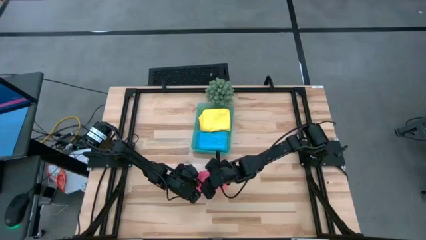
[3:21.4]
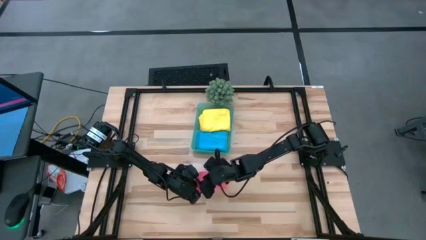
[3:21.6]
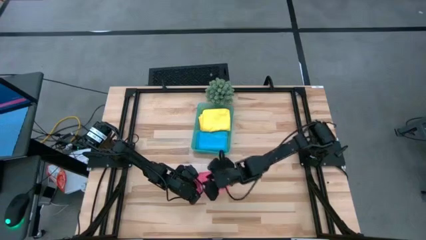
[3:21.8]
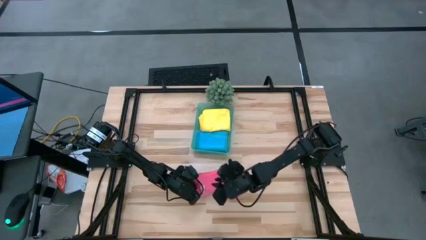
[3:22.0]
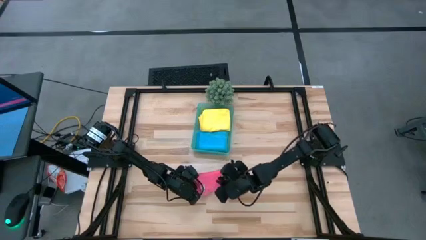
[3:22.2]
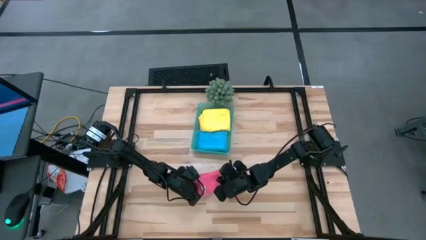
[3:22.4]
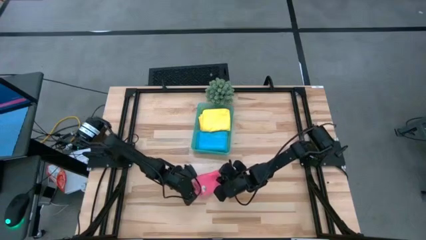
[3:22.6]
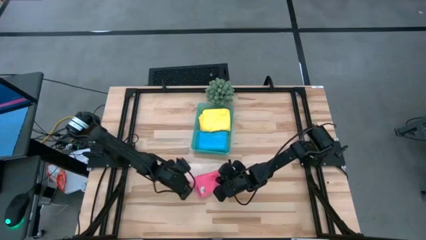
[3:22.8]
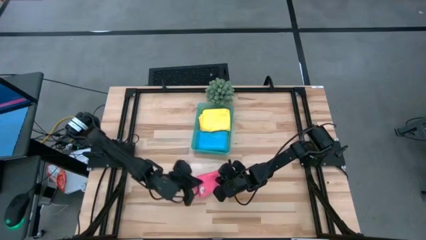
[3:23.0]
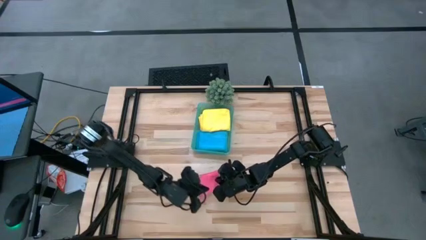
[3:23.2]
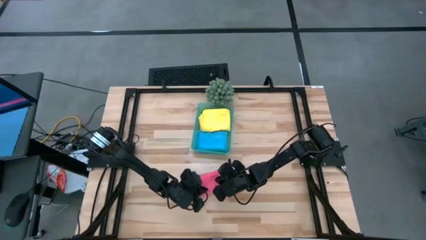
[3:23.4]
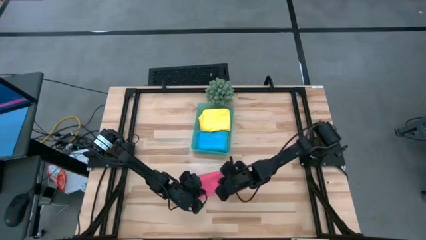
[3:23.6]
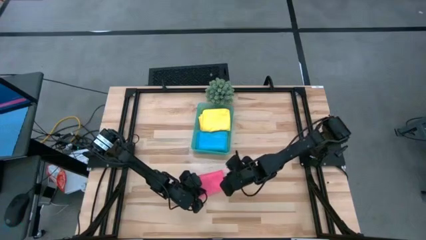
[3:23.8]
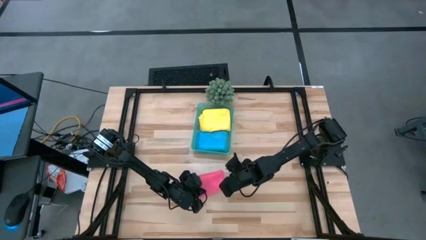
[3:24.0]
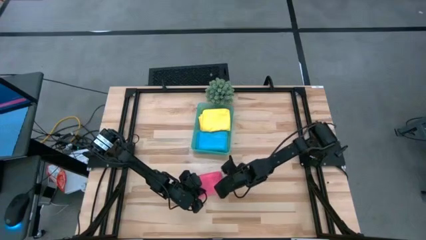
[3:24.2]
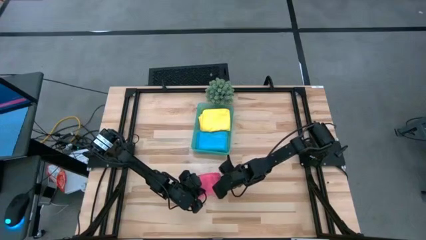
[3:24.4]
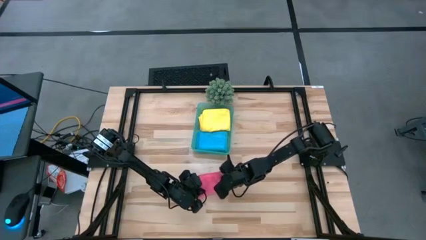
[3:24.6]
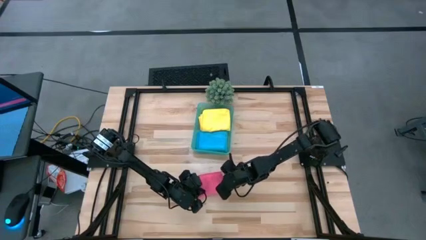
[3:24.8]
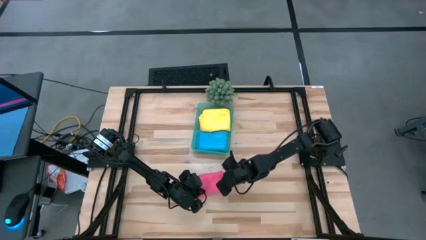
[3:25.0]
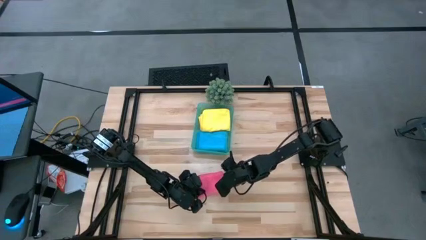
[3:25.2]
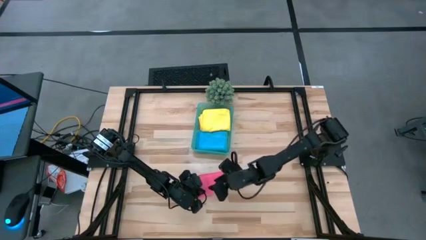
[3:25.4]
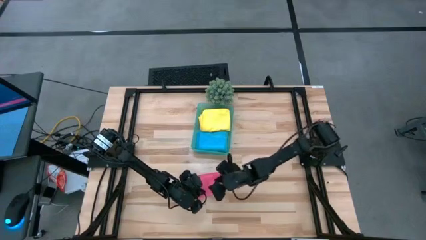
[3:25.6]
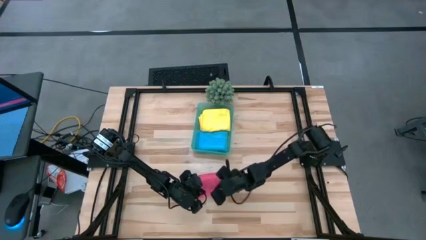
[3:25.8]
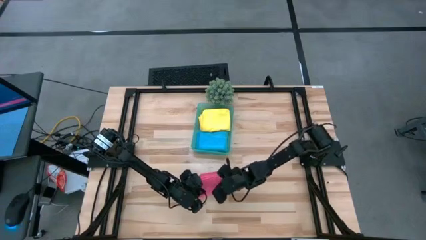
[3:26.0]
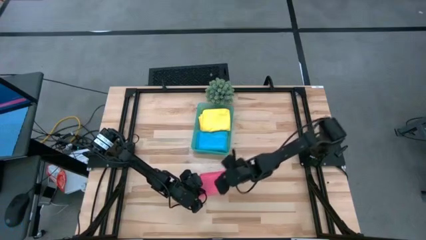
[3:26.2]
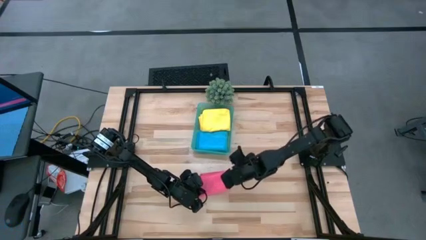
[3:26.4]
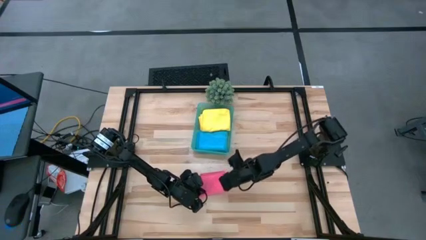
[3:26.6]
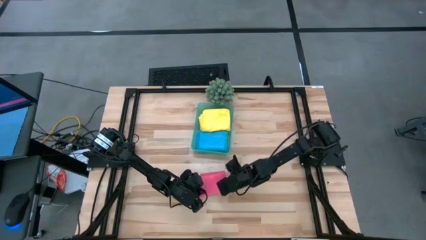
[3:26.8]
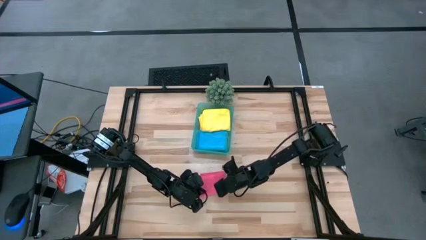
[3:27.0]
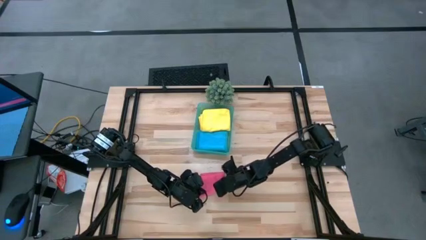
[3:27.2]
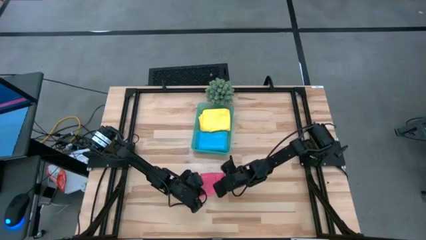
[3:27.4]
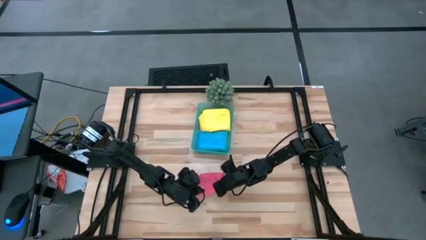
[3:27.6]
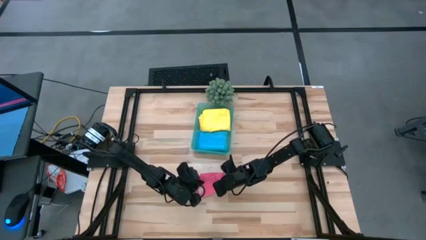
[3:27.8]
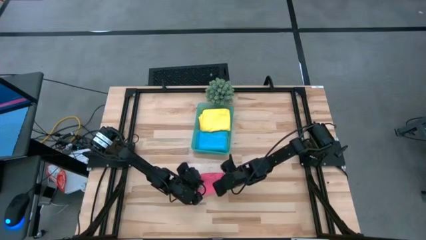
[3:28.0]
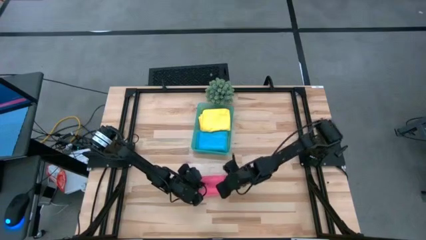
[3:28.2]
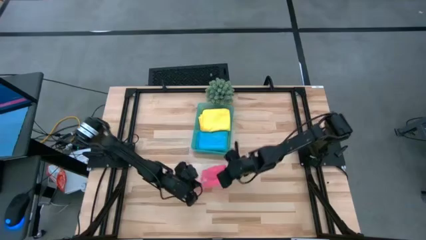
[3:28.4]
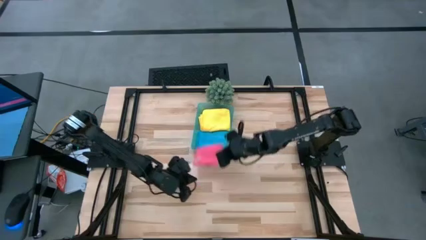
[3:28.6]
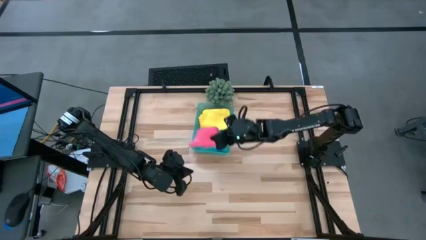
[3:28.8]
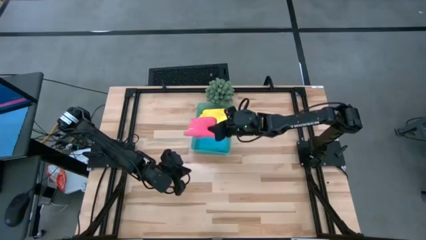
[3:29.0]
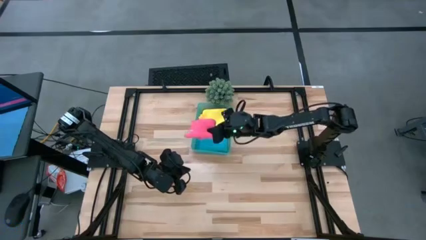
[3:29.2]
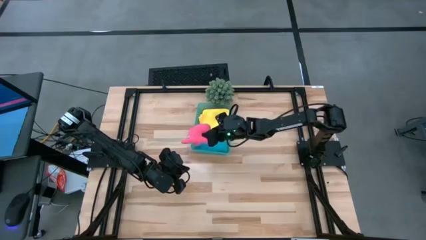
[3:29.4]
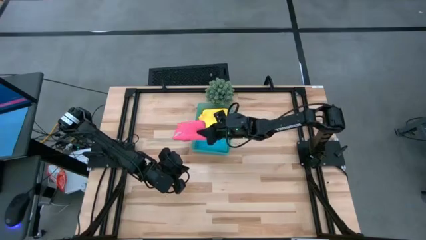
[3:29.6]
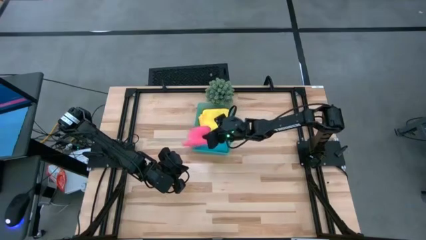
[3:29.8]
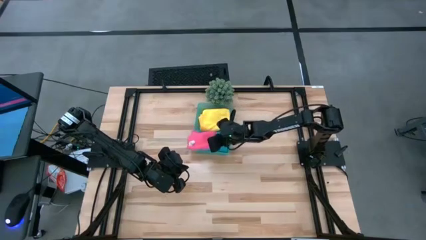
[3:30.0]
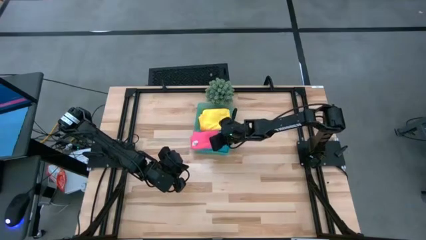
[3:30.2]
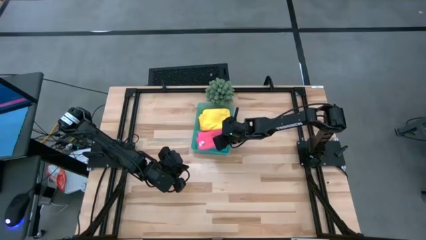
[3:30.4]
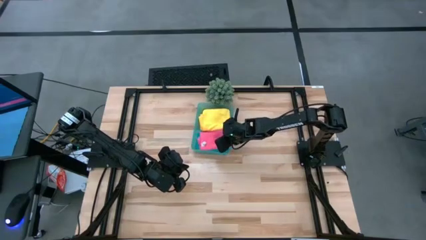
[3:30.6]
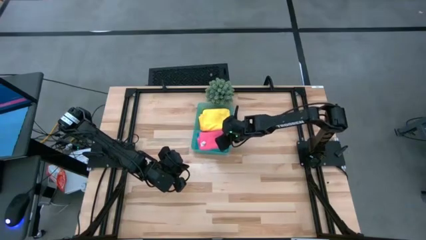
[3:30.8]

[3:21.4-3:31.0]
Task: Fold microfiber towels
Put the pink micro fiber cloth into the bin on top of the blue micro fiber cloth

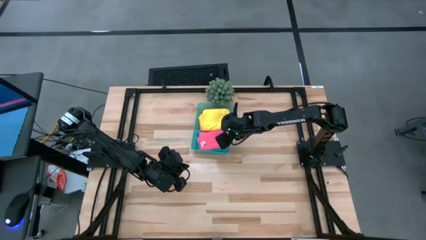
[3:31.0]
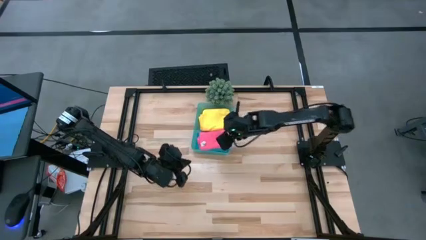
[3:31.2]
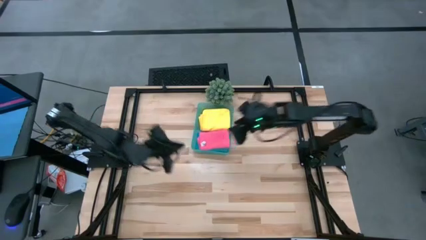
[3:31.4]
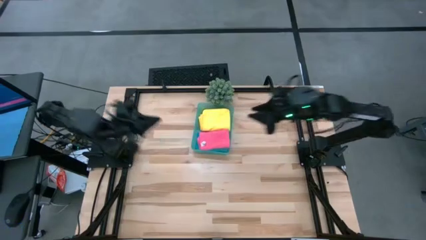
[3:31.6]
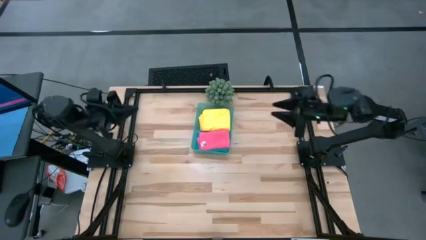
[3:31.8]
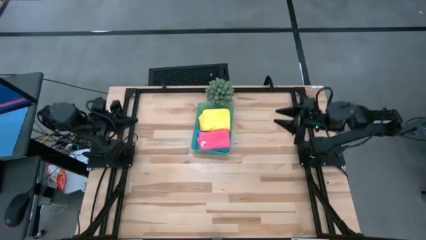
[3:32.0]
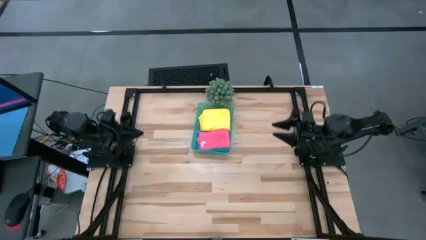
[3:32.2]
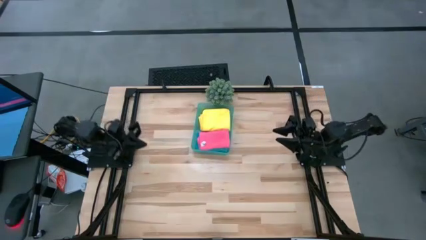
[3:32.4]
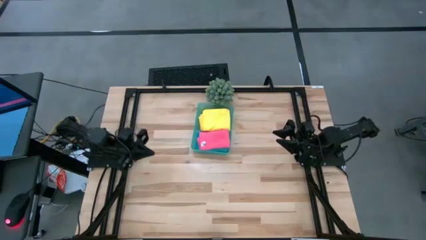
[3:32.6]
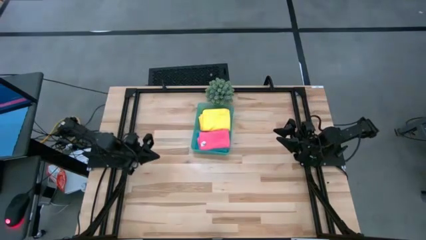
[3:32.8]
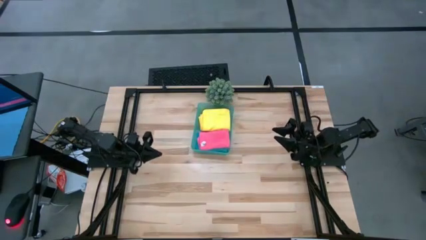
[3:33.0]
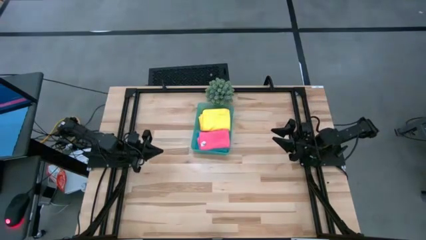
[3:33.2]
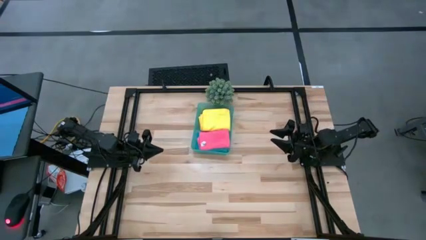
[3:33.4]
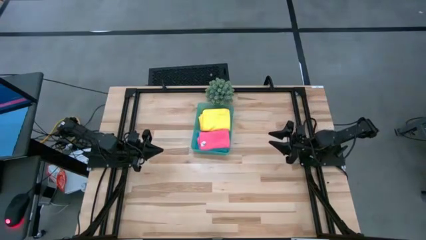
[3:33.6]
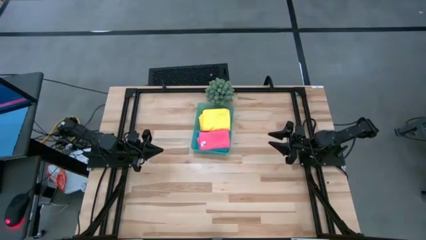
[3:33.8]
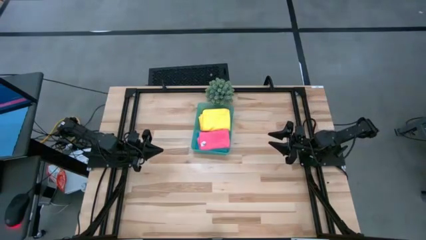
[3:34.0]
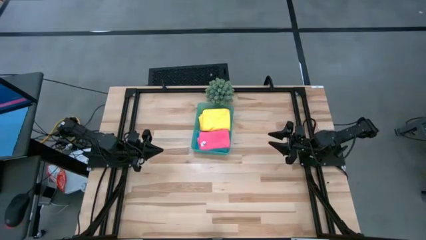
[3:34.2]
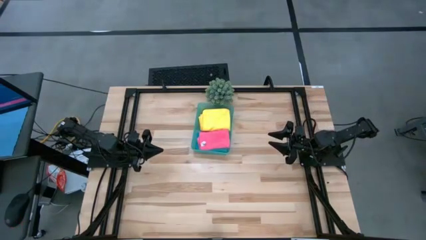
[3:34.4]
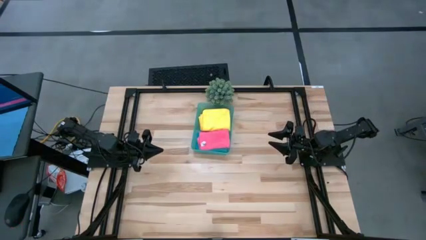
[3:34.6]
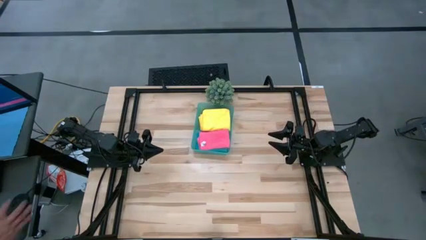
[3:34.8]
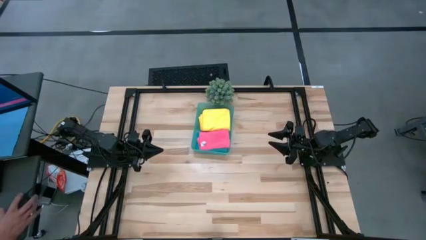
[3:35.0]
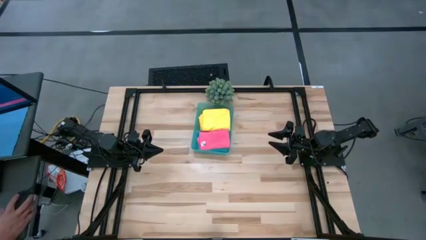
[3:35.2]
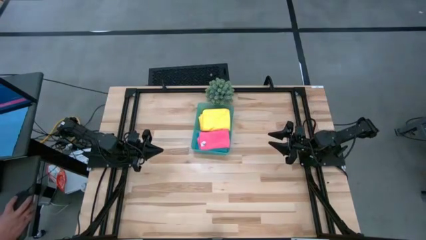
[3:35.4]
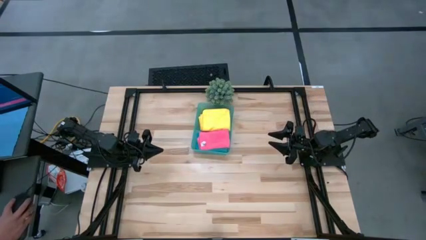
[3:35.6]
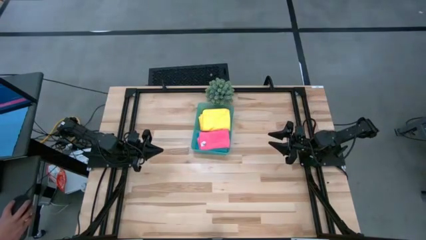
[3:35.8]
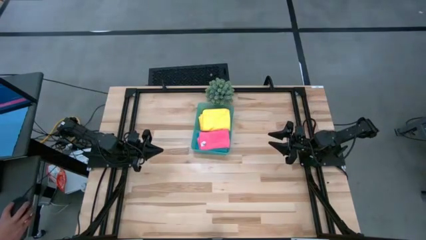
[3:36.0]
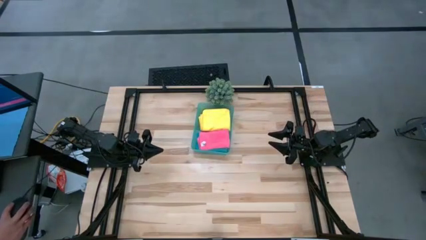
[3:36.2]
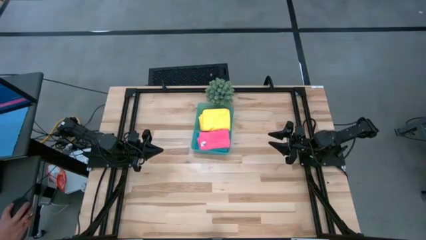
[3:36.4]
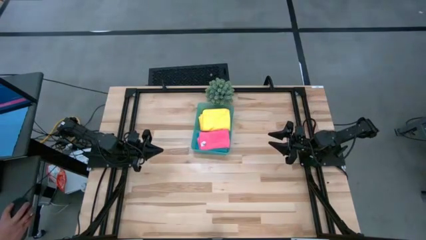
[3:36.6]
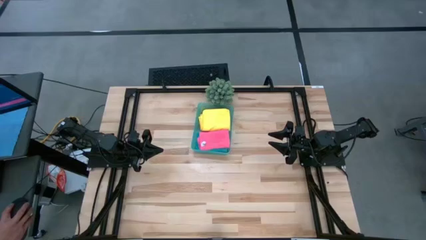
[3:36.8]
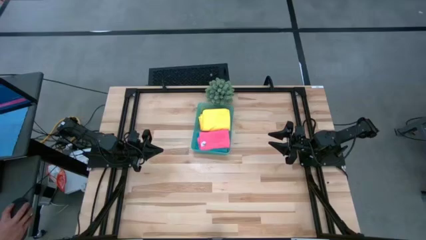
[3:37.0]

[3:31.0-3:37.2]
Return to Home Position
